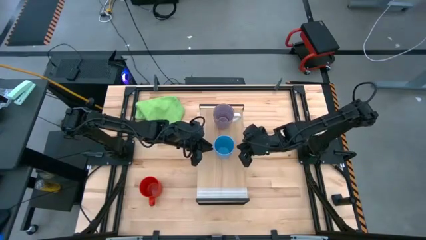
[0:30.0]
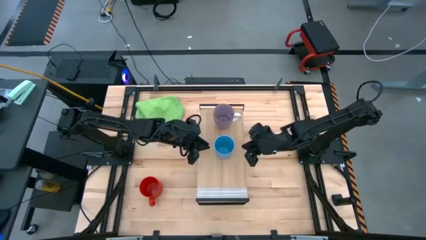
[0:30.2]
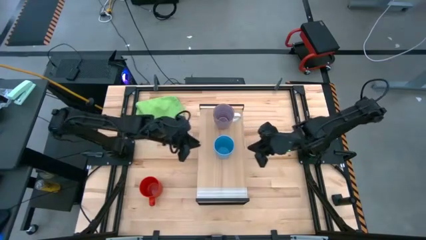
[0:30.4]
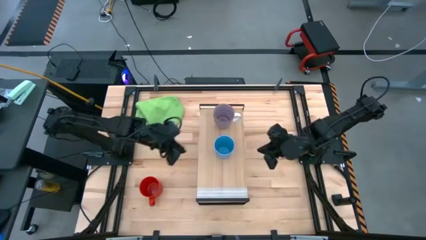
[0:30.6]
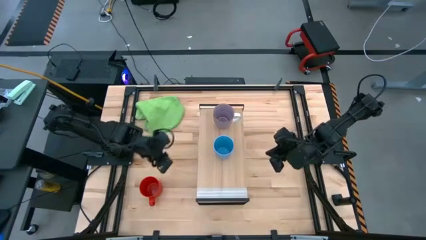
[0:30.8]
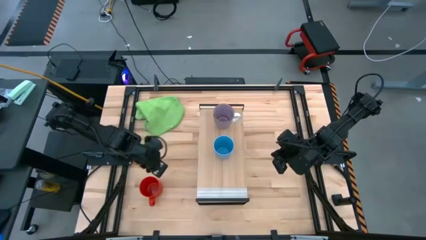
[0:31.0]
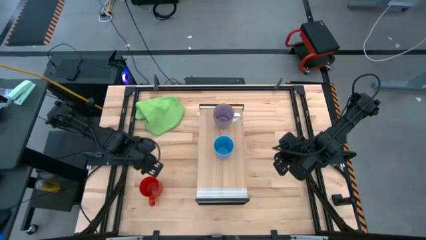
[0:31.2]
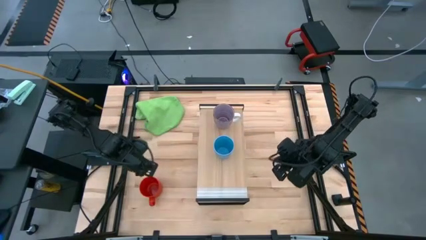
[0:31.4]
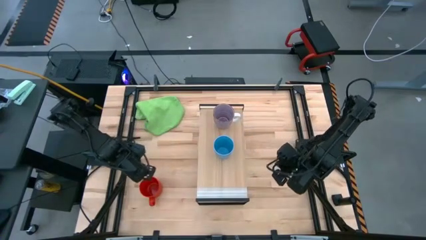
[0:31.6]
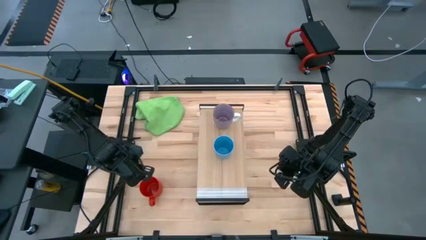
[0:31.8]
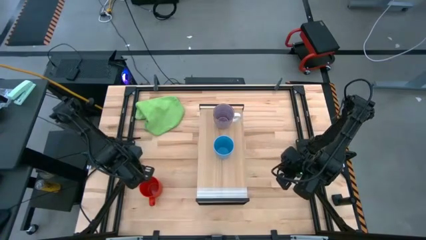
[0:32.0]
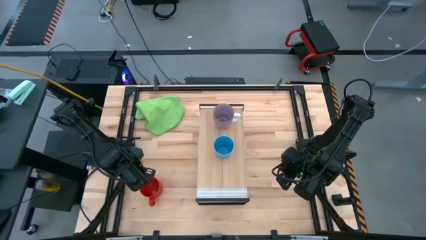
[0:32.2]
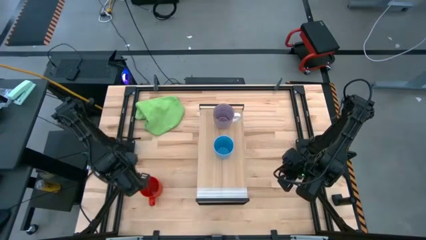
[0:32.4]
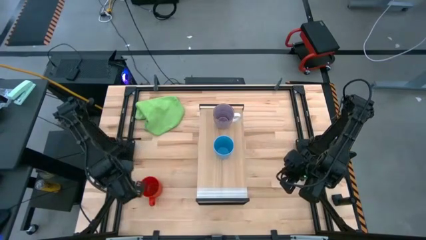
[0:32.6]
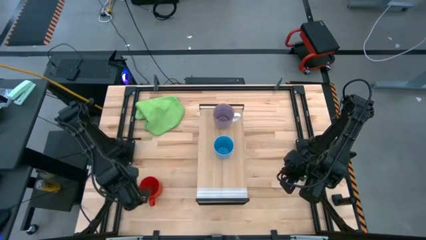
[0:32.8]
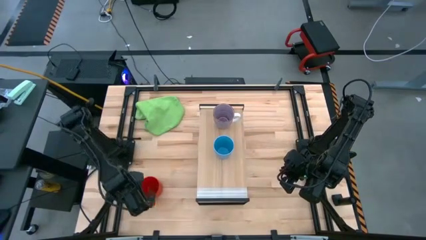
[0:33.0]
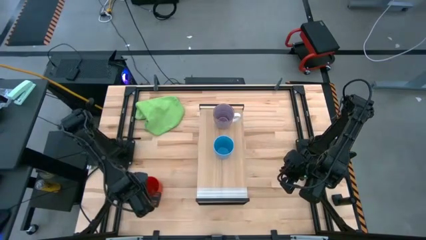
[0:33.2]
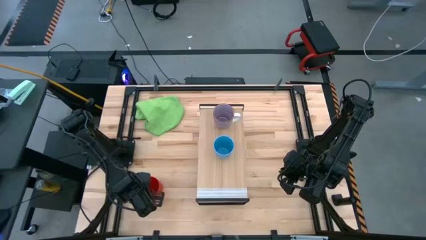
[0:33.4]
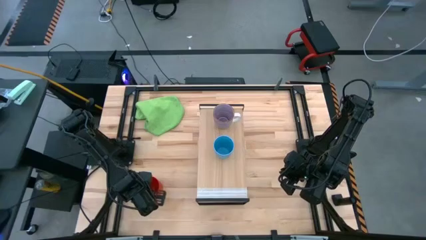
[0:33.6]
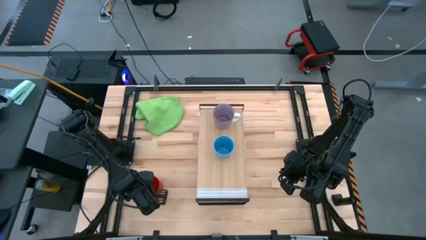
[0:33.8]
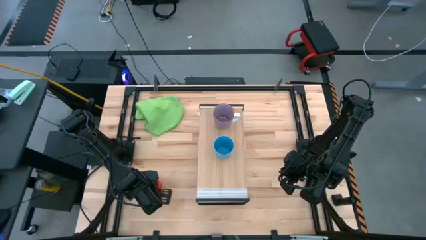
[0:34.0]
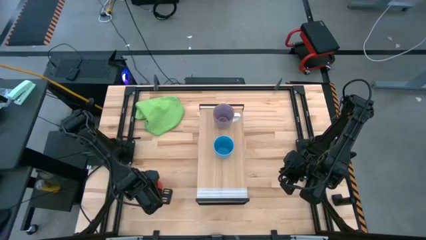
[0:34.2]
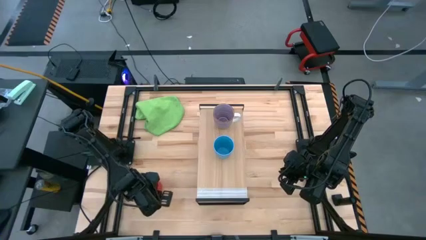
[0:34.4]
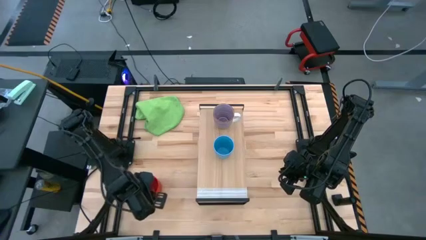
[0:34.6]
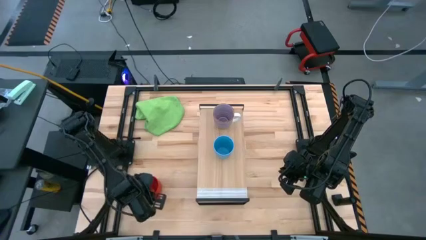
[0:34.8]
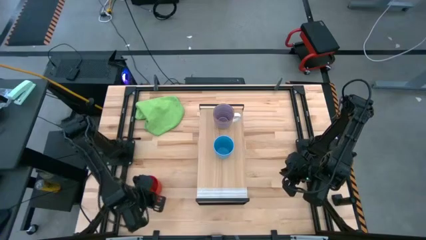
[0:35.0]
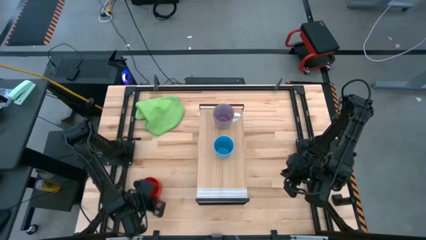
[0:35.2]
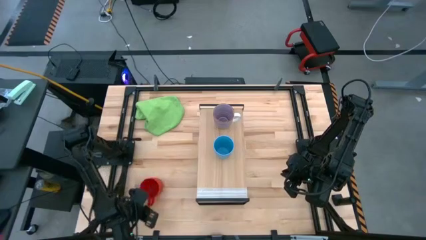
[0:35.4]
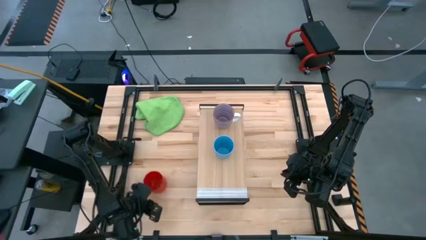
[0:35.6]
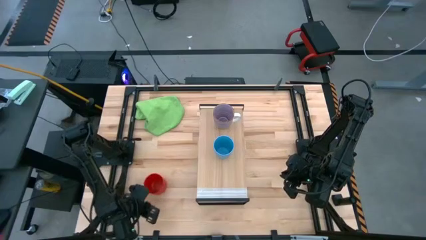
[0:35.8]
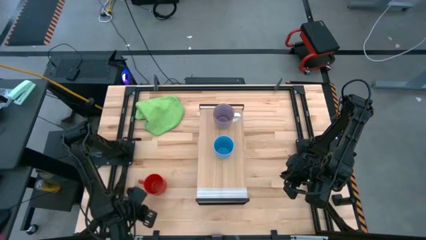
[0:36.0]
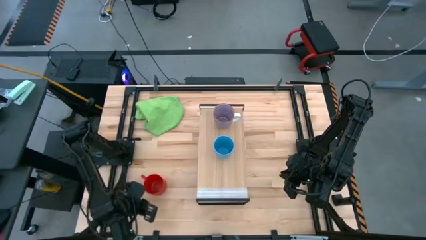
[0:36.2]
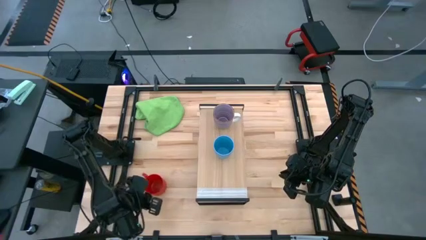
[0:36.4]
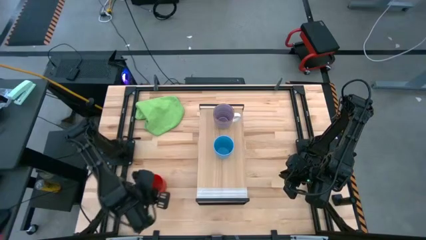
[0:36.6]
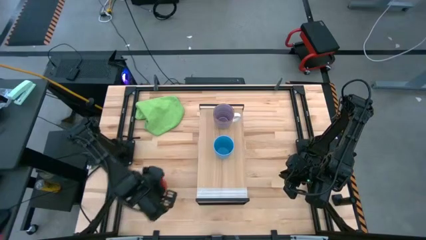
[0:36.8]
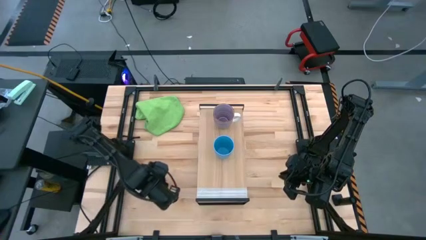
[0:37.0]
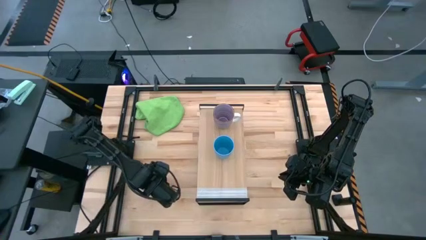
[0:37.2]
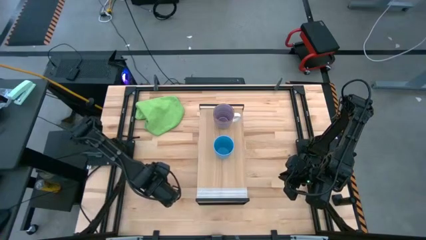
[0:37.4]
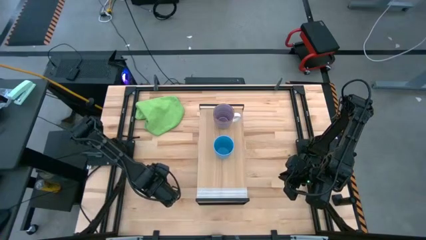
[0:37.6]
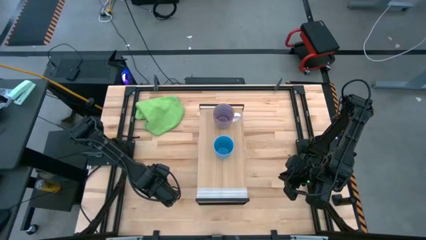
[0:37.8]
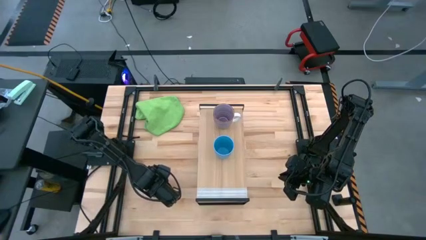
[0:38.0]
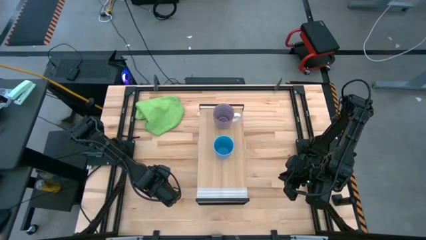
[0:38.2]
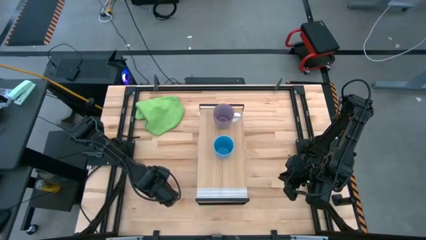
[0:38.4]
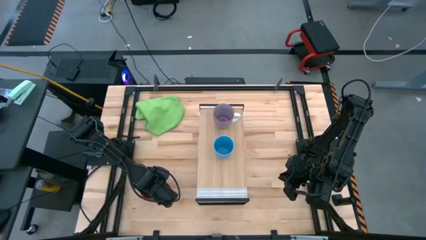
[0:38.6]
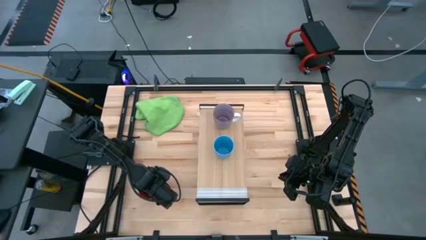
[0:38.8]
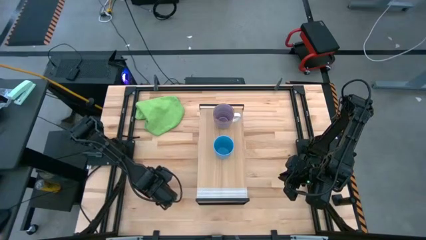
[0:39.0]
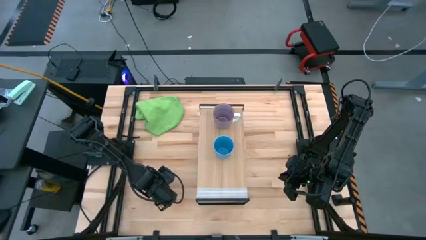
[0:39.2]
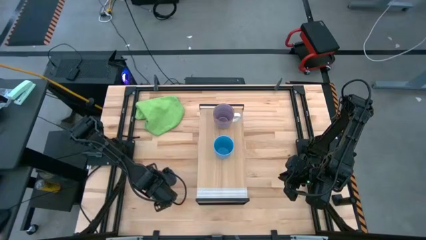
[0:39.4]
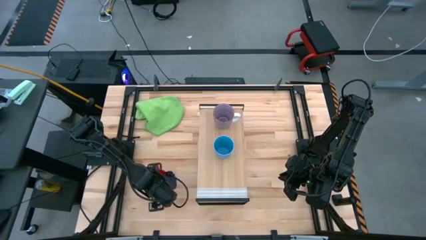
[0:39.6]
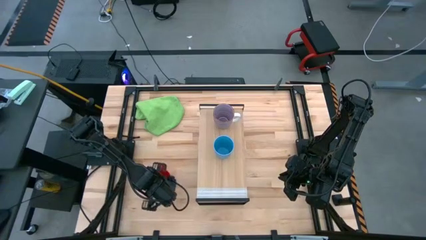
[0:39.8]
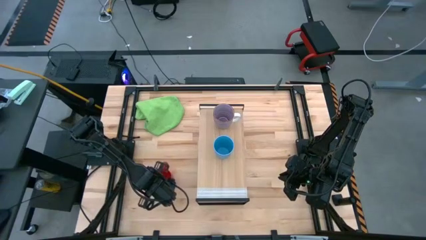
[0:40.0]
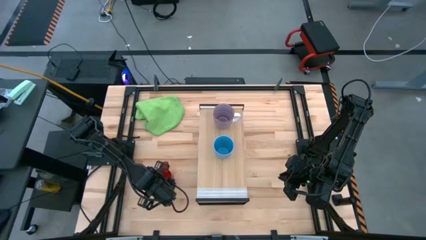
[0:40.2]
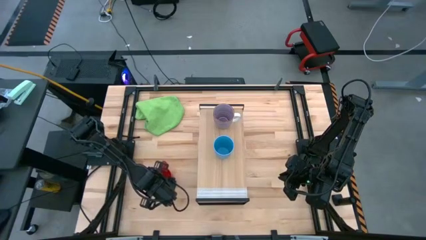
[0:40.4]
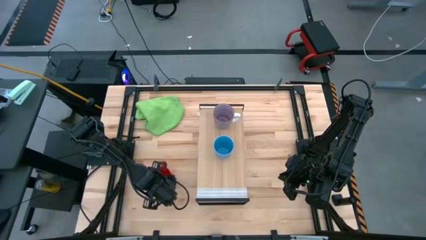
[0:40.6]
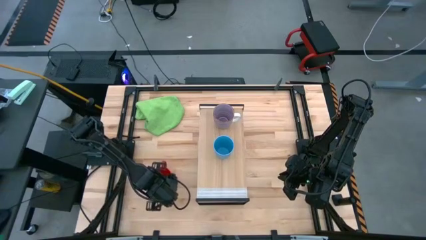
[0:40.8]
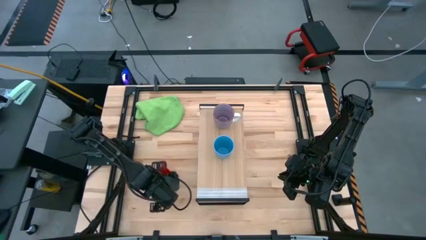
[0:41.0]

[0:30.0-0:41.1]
Task: Stack small to large cups/mugs on shelf
Put the orange mug on the shelf
